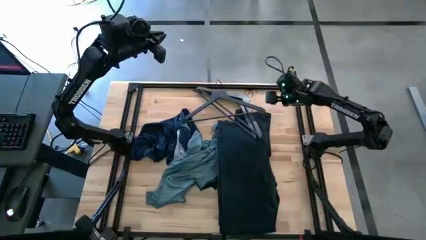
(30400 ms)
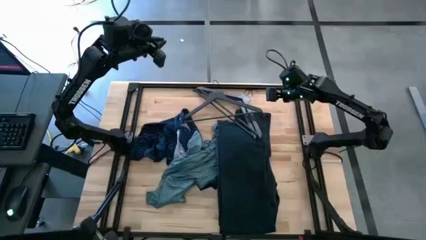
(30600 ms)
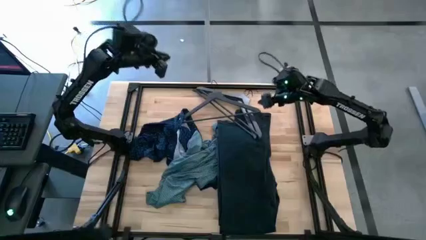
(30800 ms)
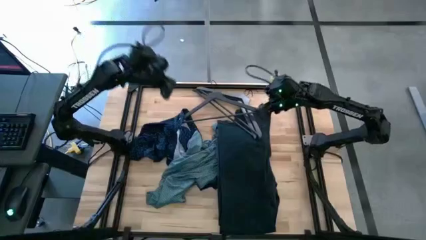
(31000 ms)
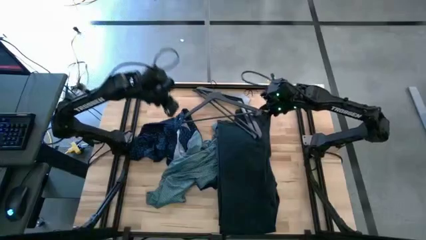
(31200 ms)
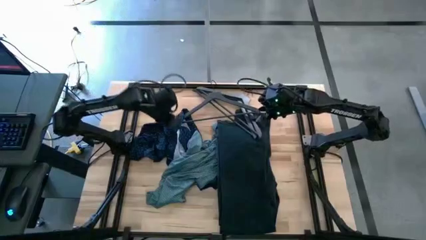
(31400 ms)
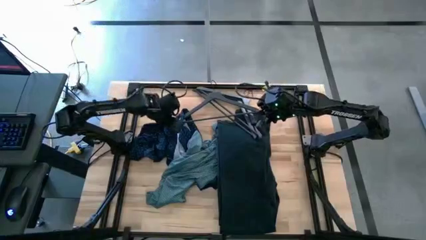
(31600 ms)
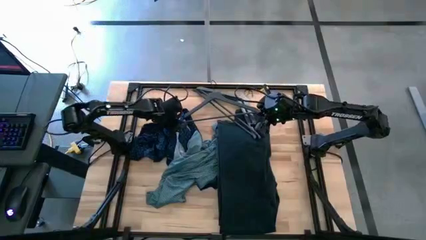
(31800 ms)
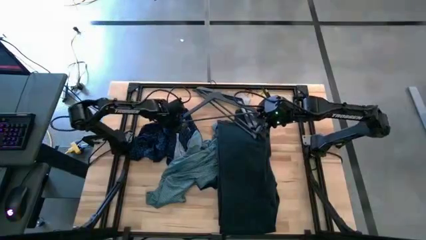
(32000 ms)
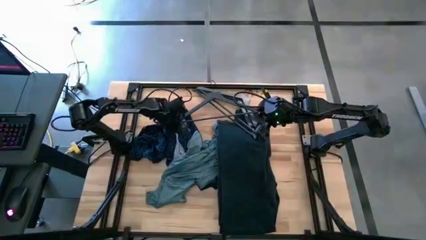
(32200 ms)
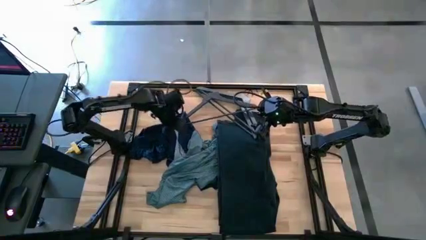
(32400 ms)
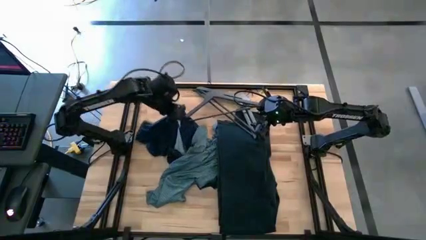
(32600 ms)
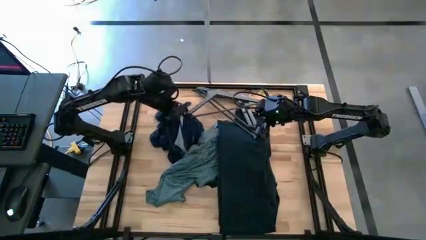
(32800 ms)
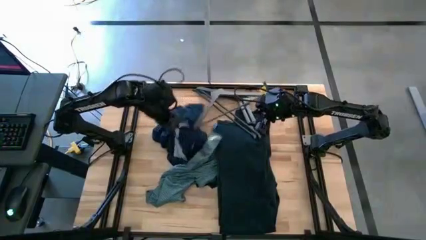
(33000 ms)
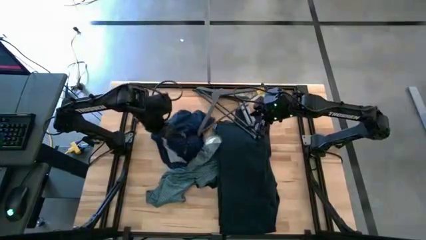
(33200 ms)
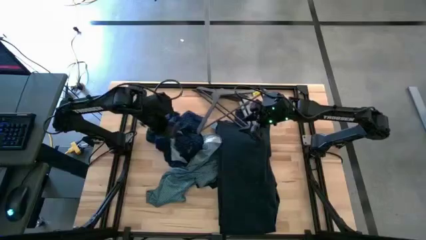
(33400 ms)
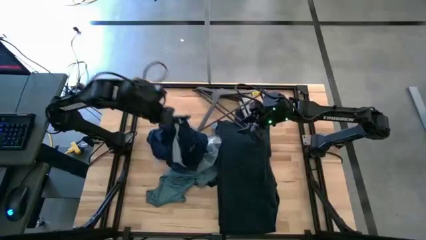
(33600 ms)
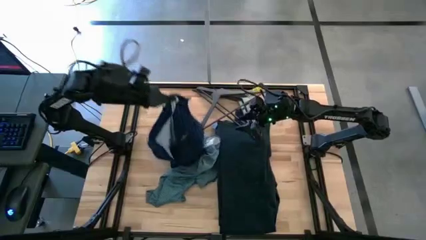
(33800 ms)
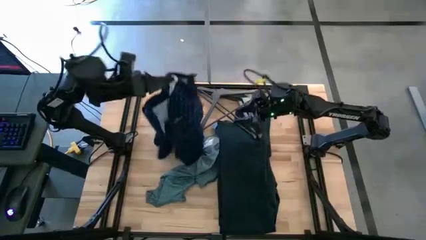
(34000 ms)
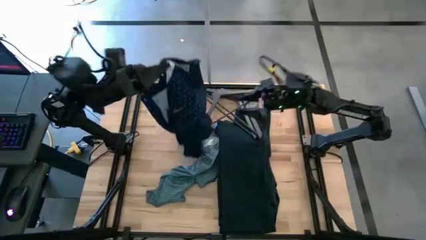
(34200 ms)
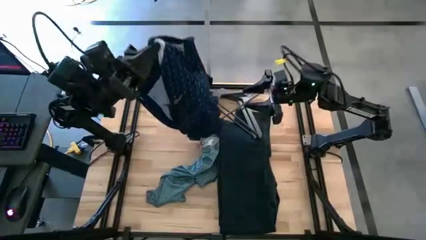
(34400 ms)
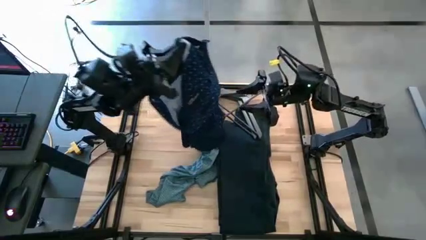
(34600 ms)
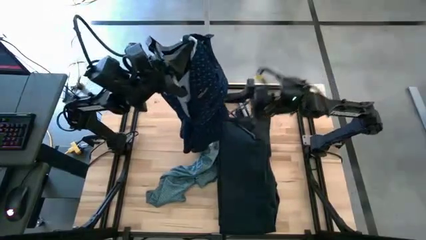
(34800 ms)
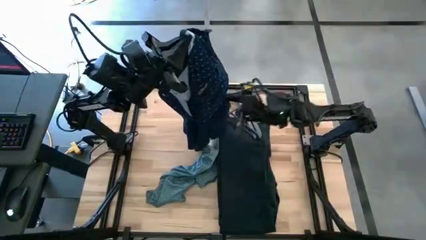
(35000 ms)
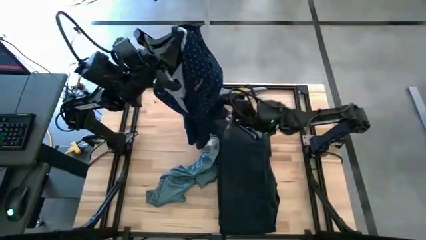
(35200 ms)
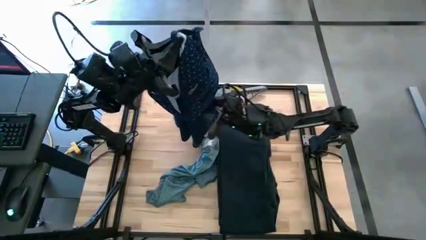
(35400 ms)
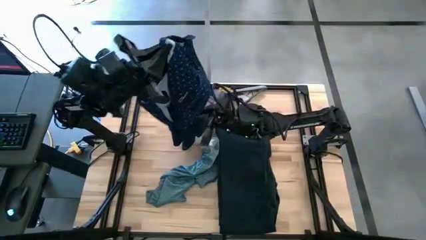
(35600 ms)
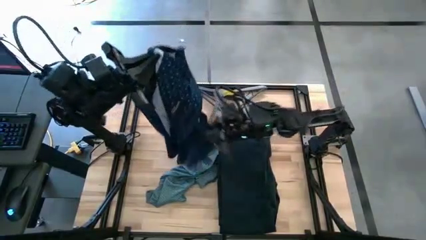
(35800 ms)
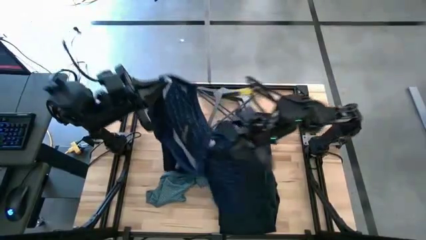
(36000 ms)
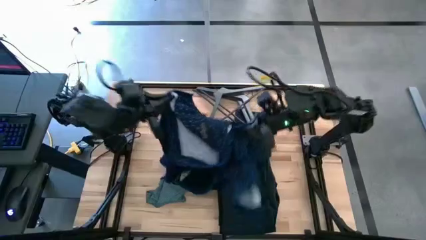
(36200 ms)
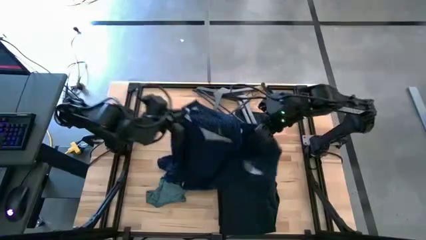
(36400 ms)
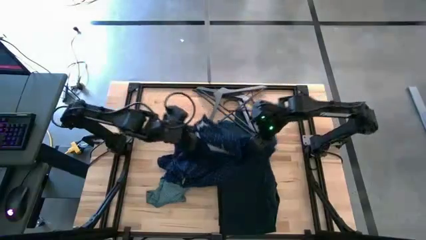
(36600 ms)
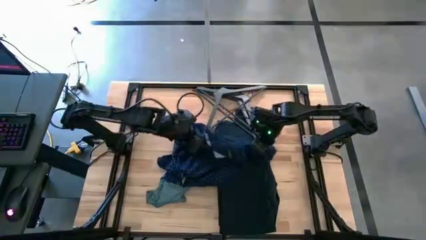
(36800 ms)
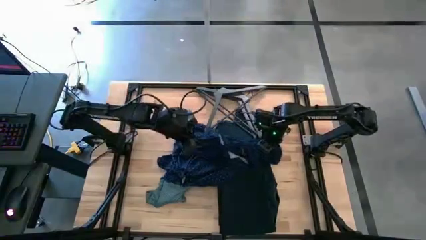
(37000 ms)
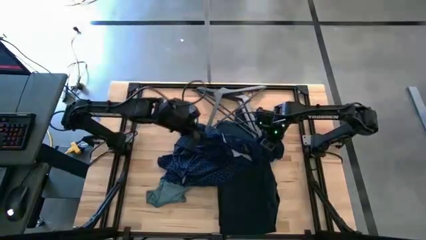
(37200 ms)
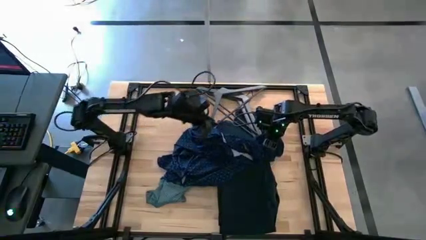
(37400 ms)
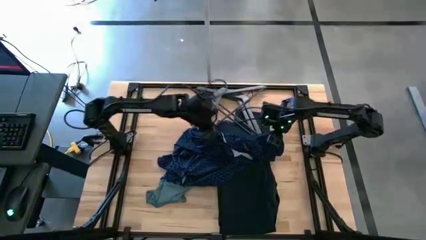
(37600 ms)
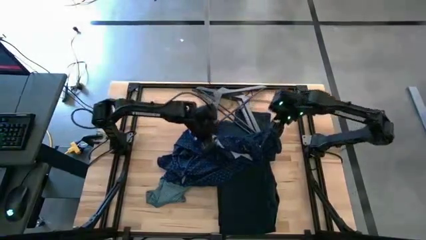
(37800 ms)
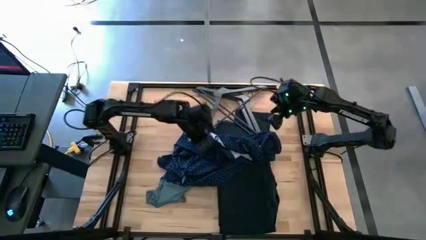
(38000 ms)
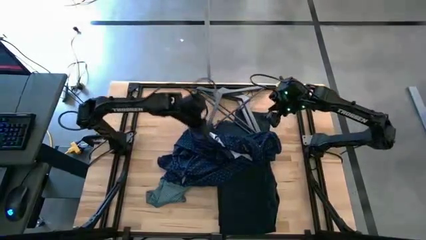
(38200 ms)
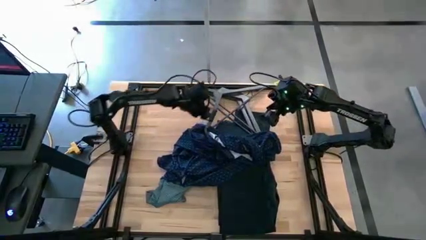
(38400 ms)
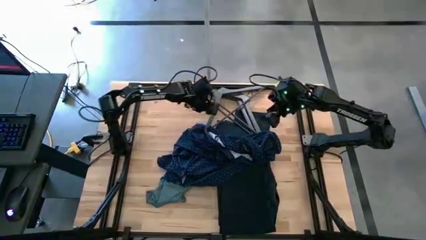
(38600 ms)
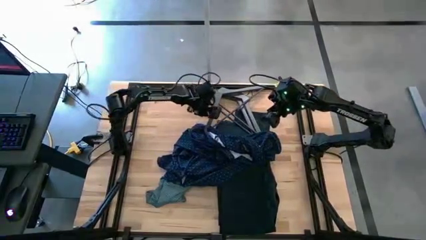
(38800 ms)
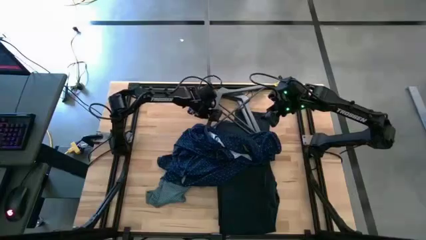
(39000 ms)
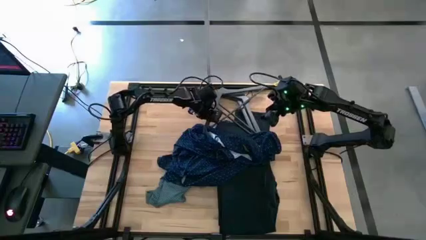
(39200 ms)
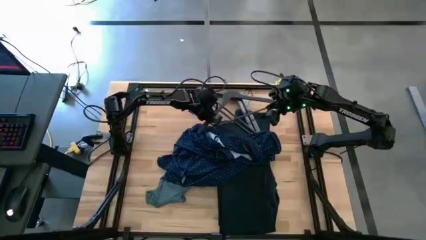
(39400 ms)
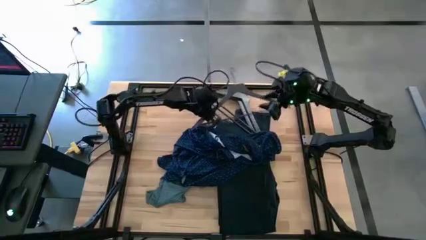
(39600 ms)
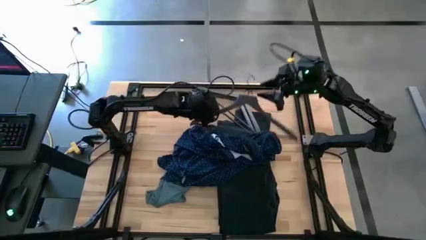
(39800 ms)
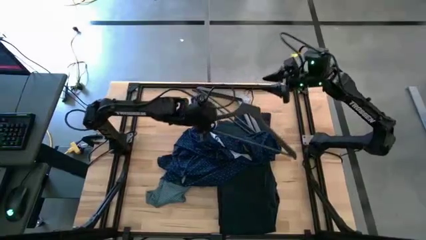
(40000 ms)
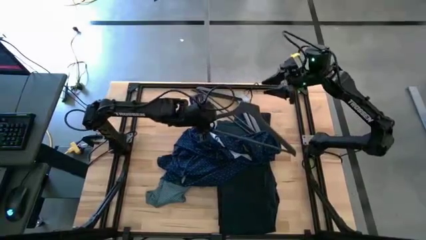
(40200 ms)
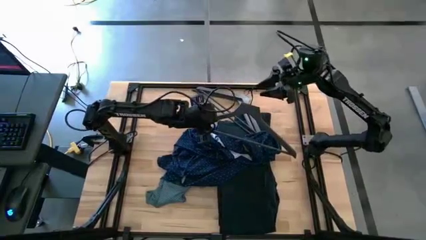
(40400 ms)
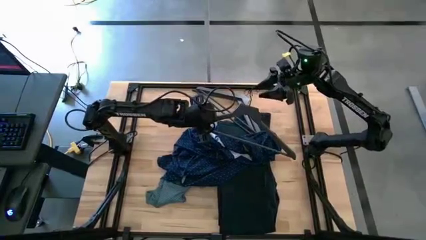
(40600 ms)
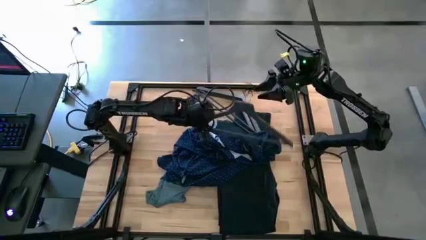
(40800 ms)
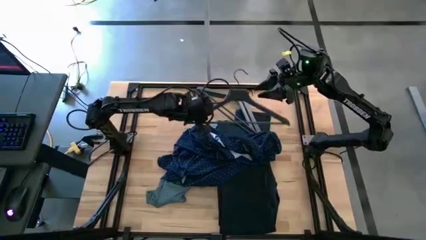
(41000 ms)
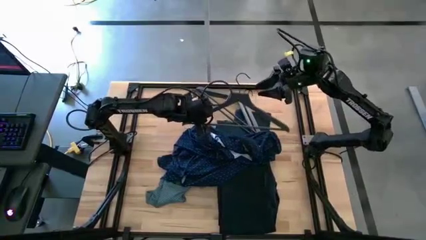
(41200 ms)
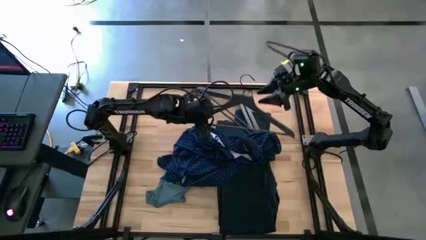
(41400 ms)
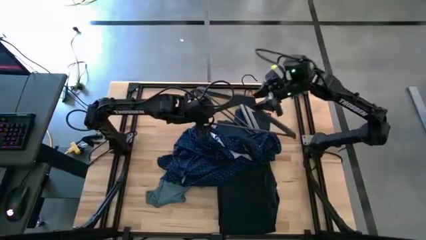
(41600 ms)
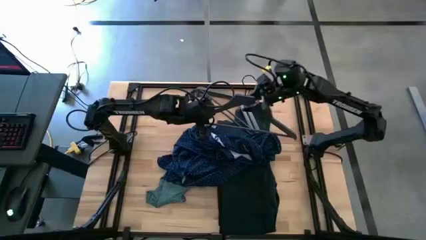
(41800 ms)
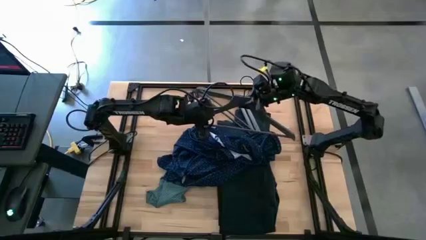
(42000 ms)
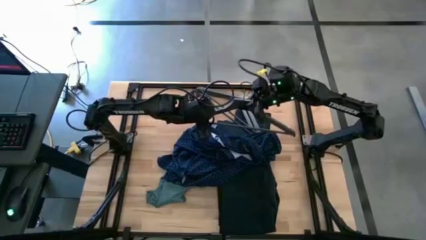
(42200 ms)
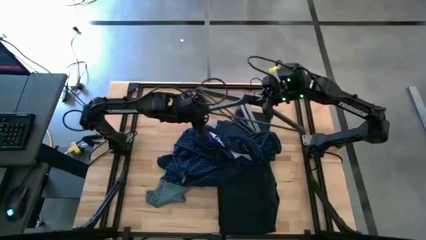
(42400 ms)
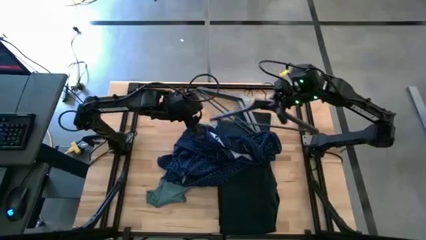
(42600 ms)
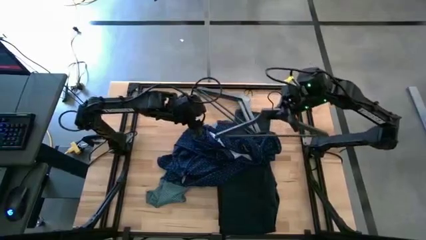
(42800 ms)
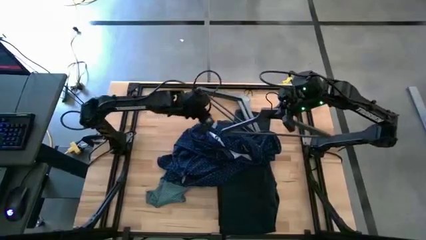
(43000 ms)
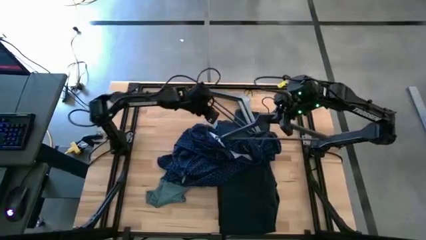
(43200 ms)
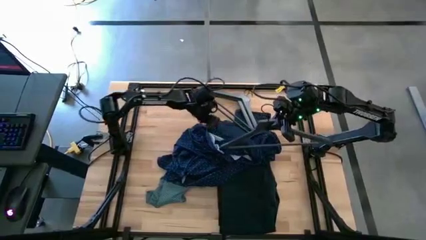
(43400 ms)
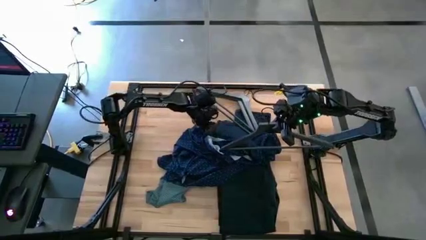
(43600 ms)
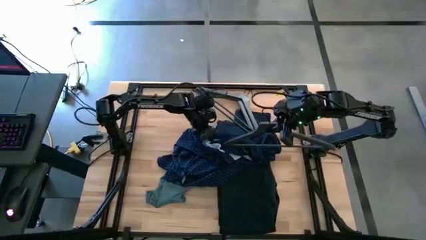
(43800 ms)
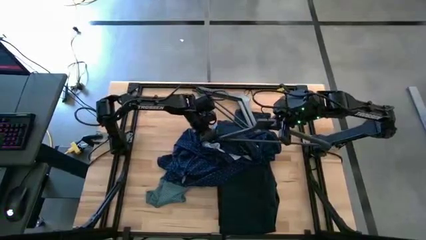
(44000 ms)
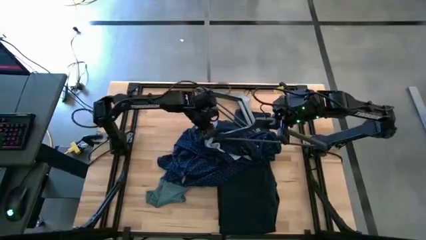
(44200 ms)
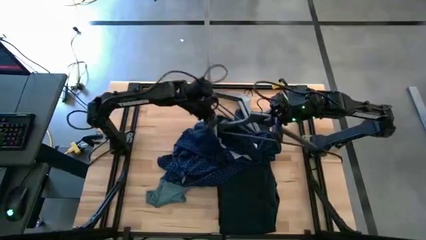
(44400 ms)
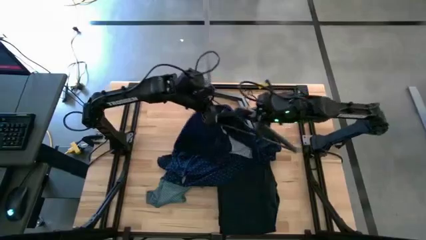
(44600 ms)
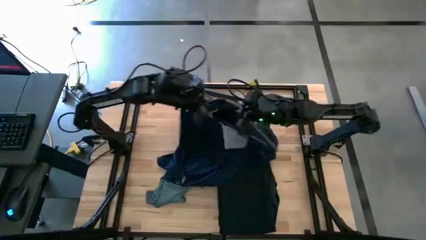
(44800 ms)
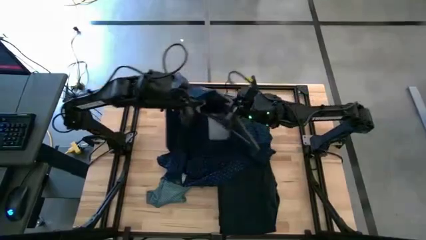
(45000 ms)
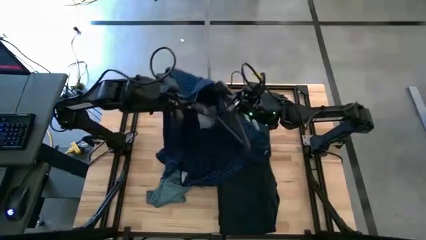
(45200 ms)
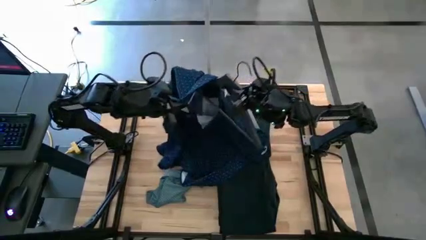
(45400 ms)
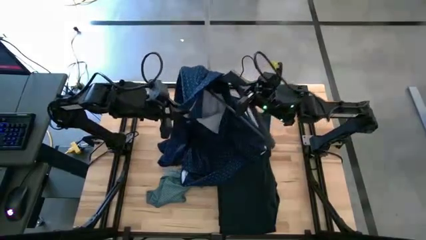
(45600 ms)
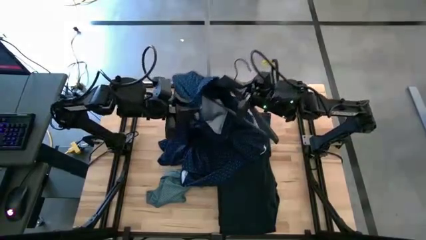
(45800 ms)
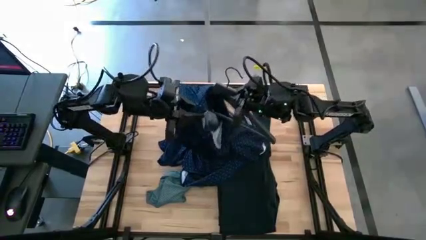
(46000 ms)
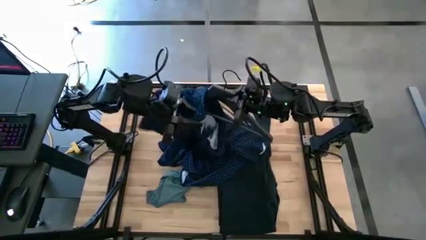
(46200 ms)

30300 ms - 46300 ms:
Task: Hang clothes
Insert the hanger into the blue polo shirt

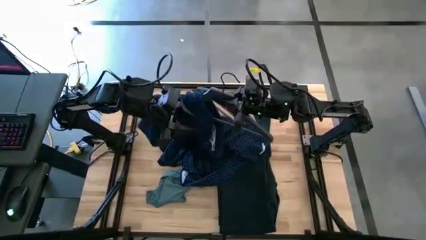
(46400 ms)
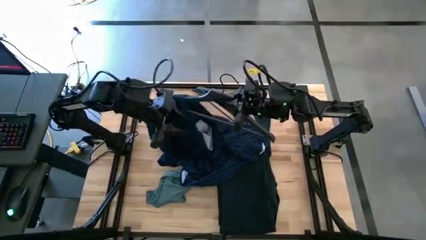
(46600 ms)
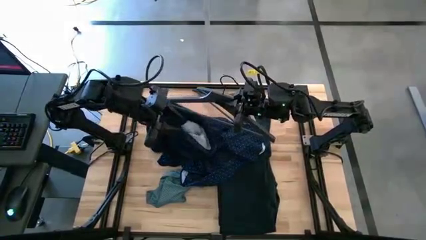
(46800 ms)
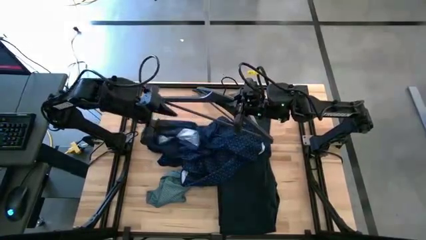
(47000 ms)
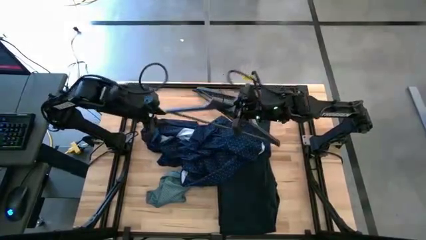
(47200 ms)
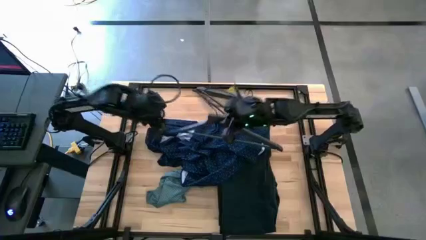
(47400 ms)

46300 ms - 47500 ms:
Insert the hanger into the blue polo shirt
